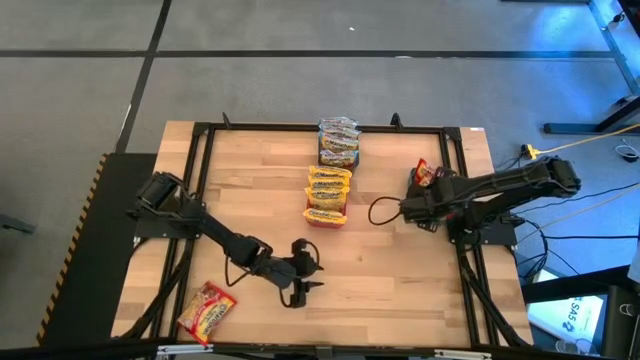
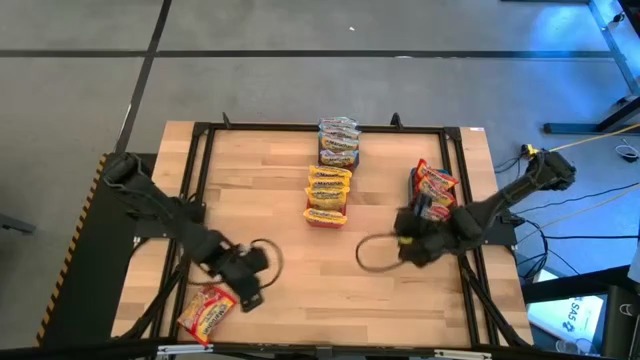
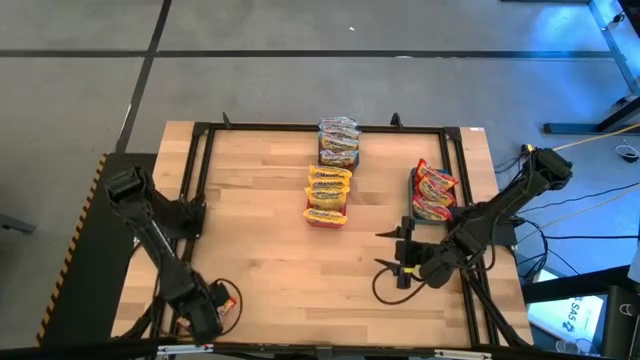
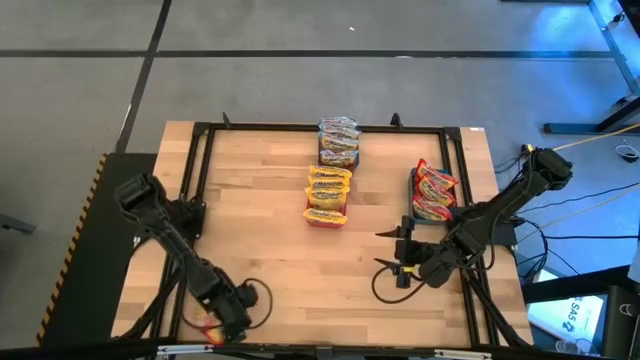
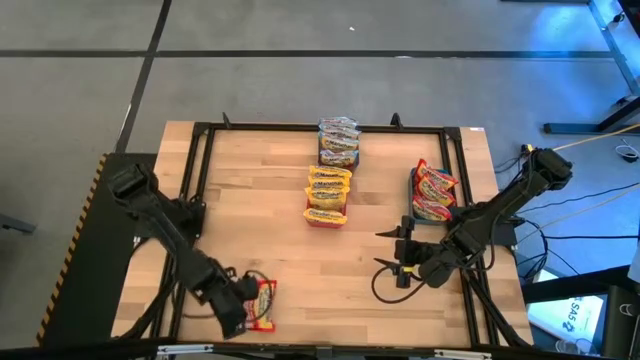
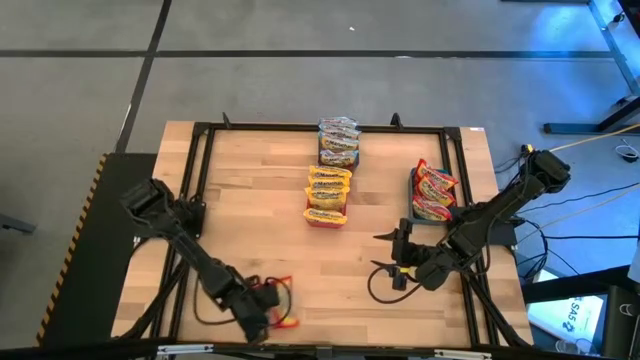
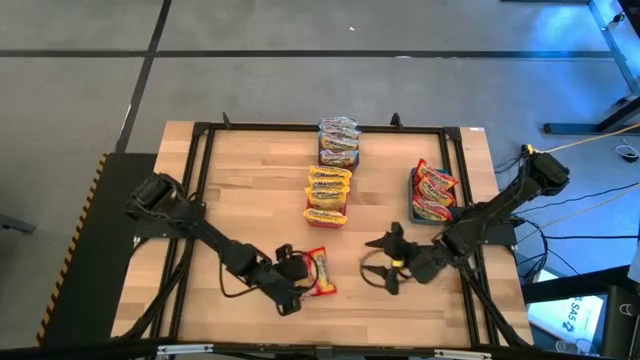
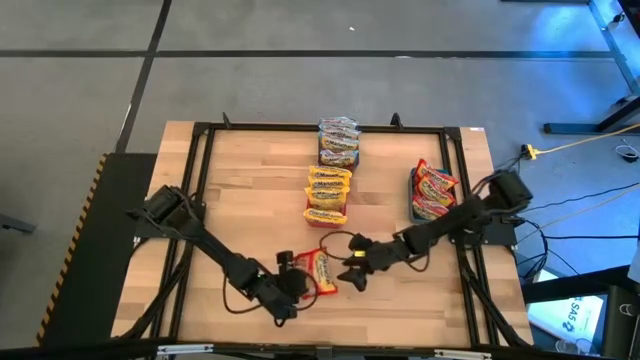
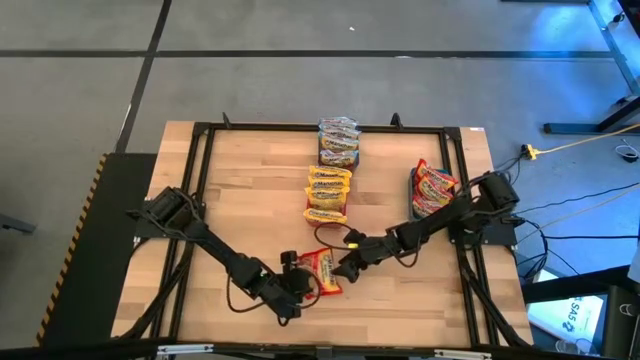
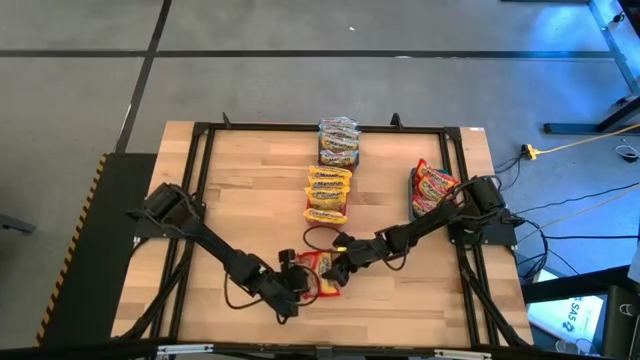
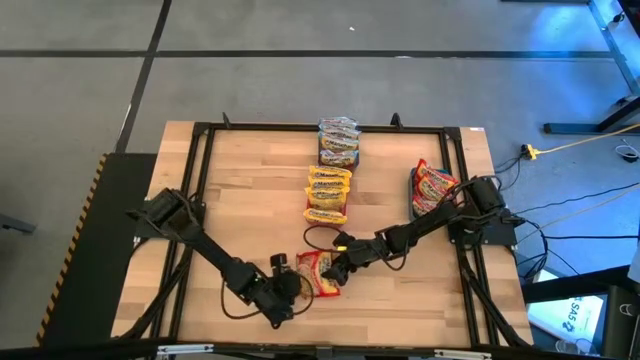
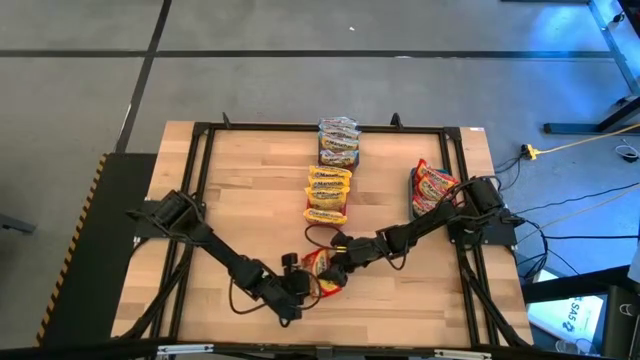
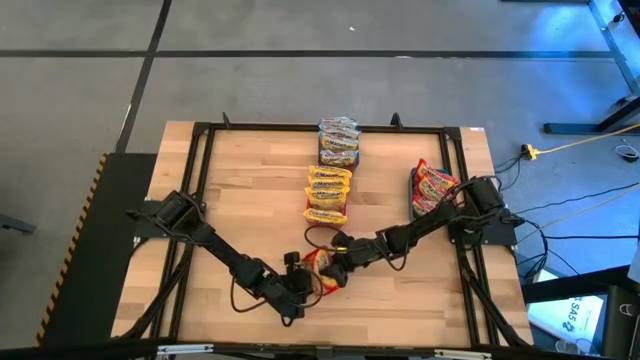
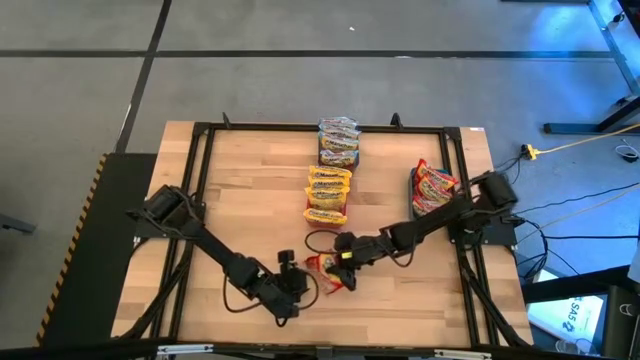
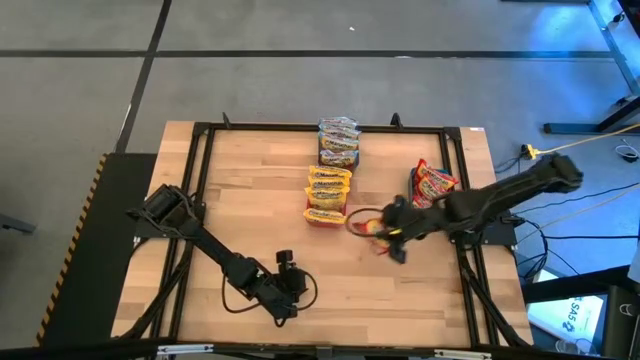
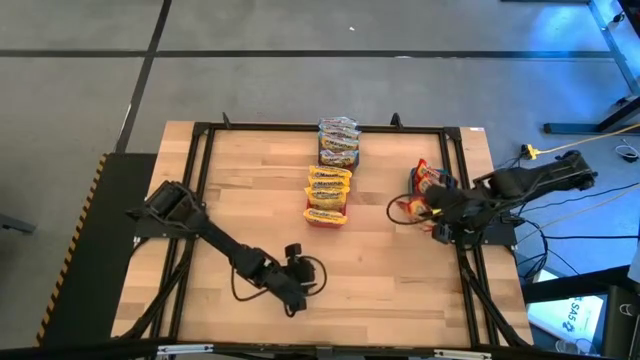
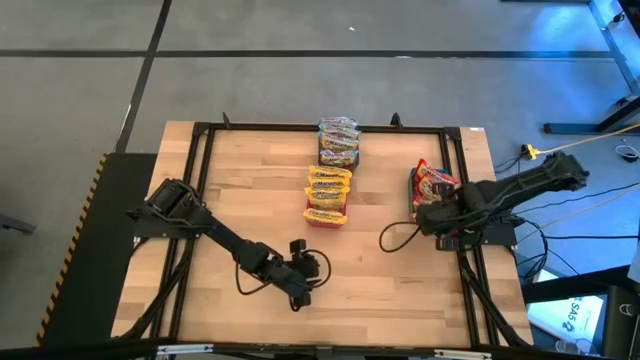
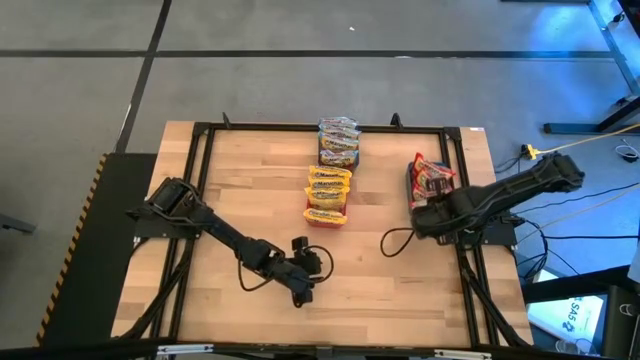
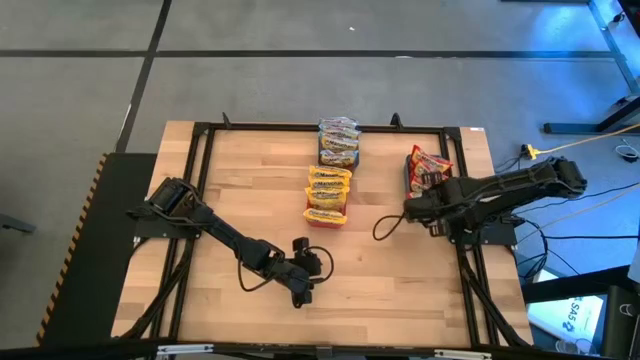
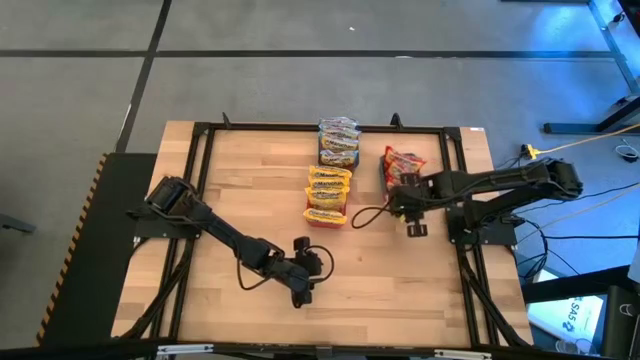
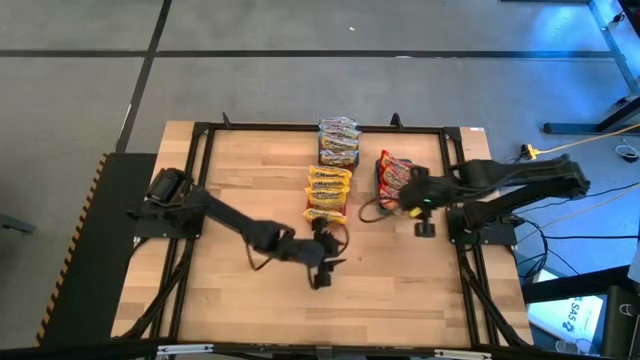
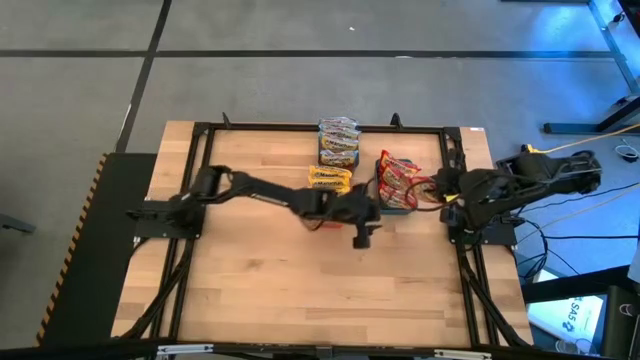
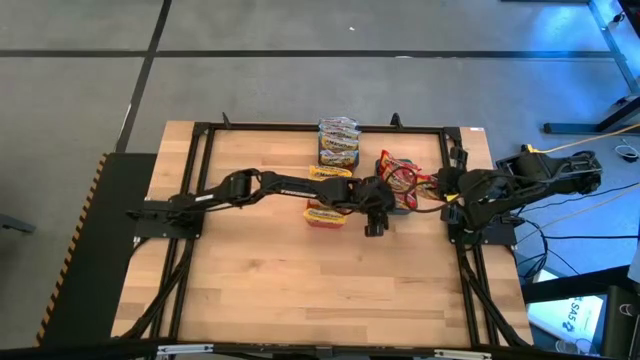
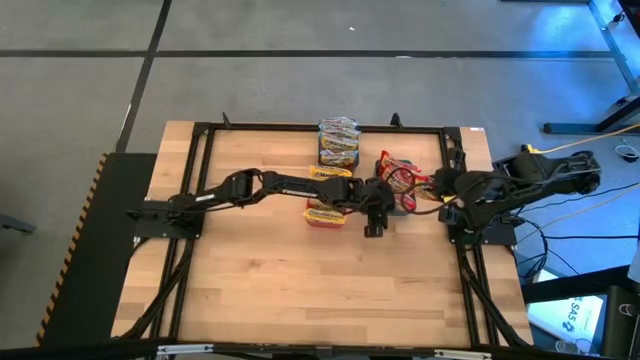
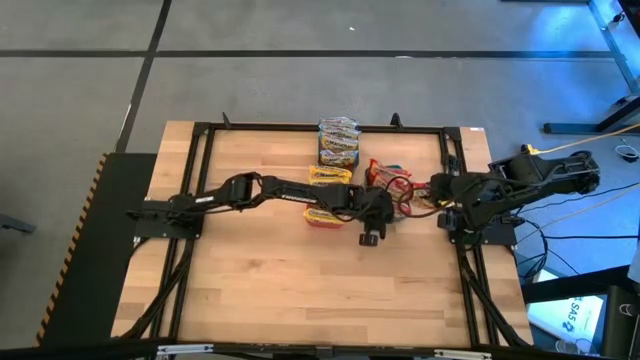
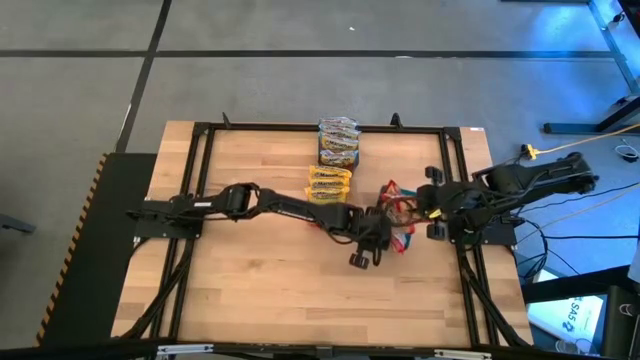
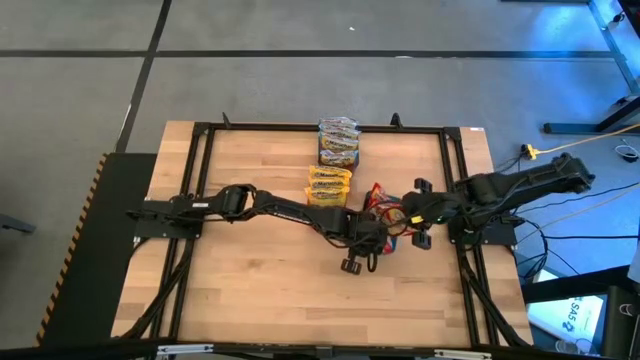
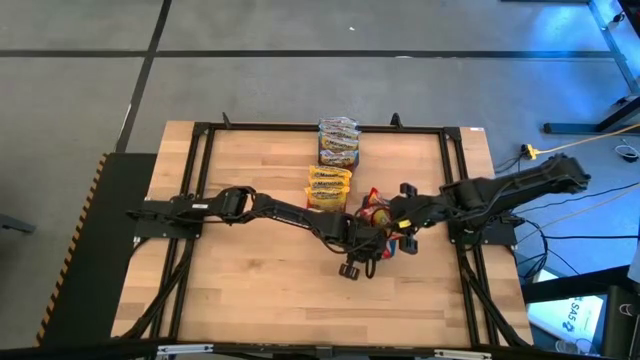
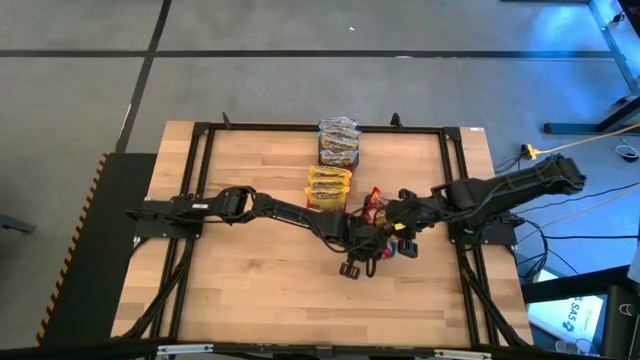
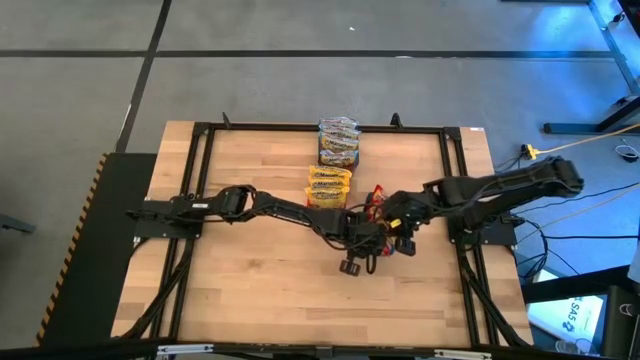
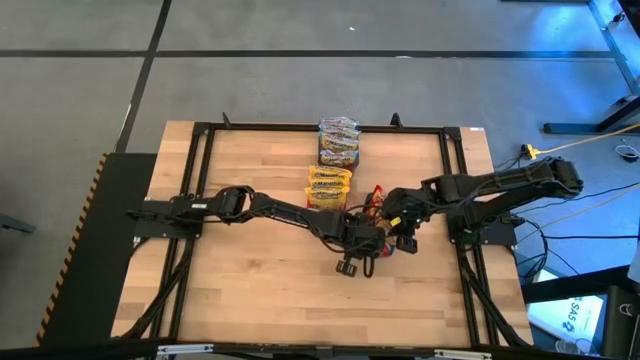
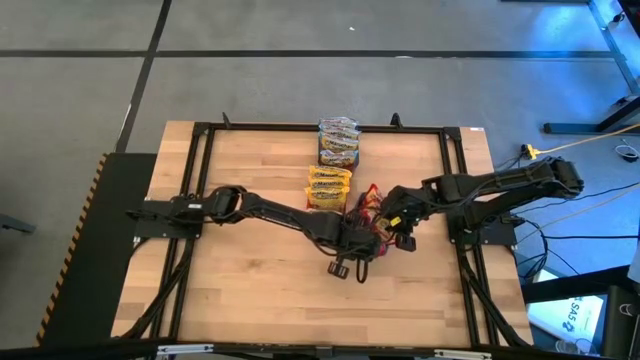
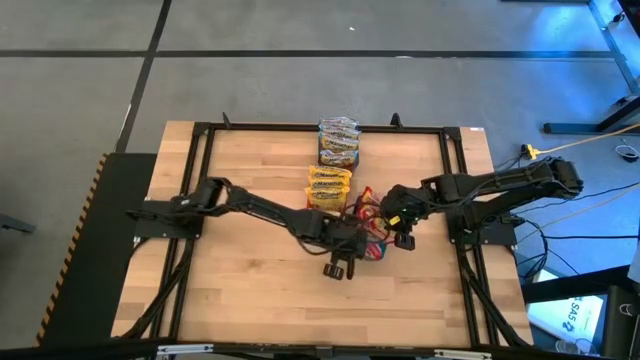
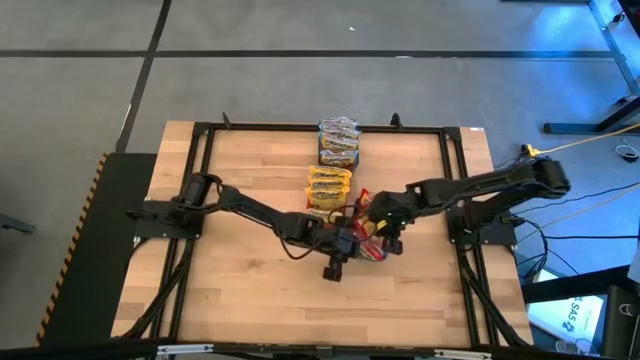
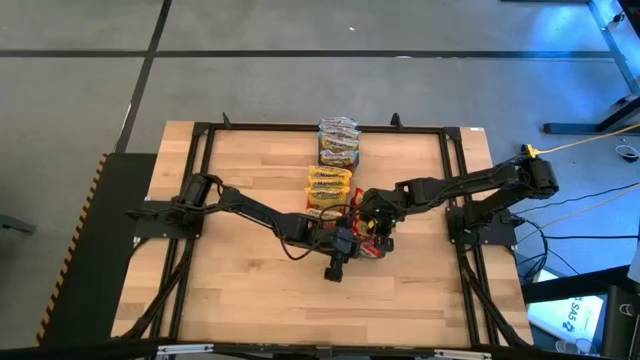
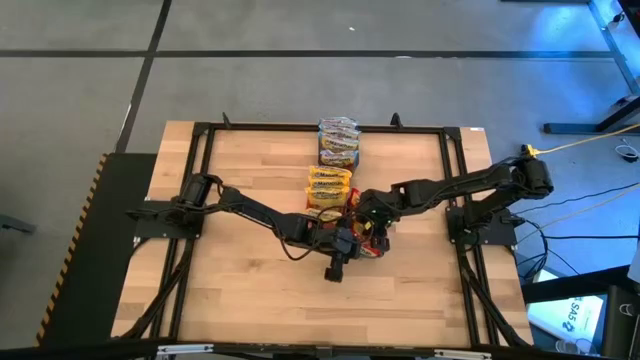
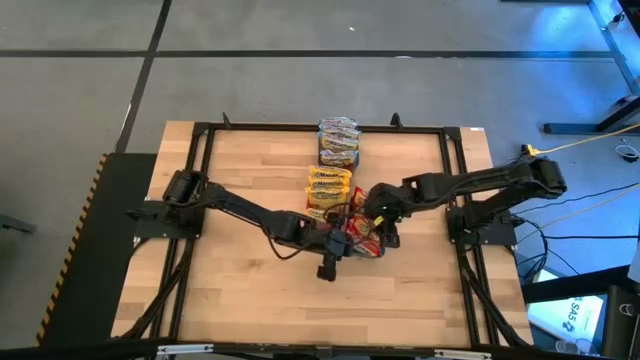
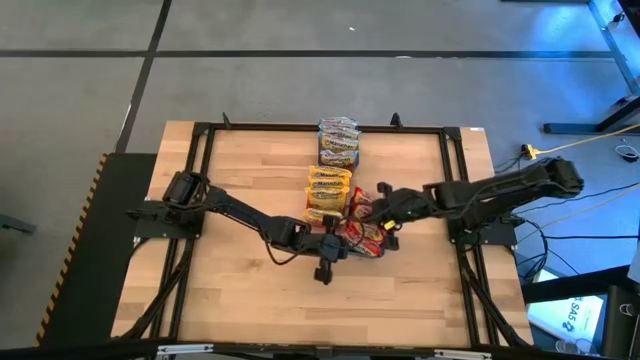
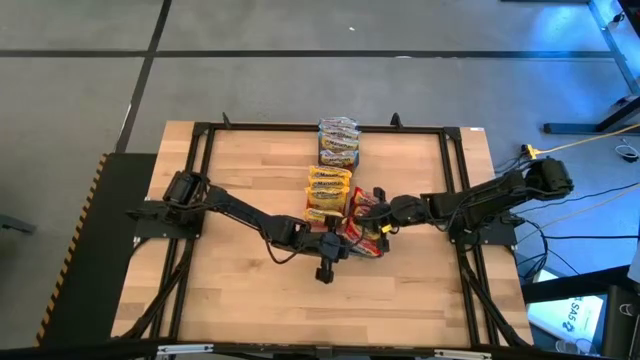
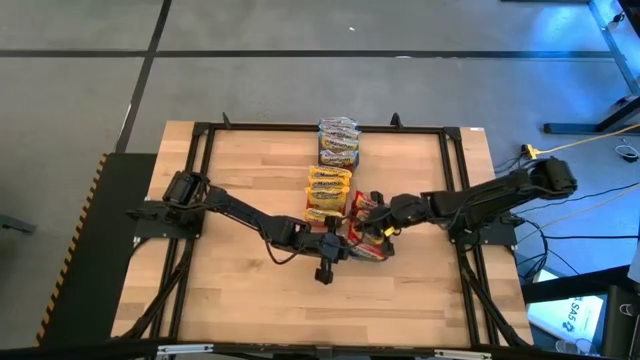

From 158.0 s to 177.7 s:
Task: Sort Maruchan noodles
Put the orange noodle pack into the blue bin

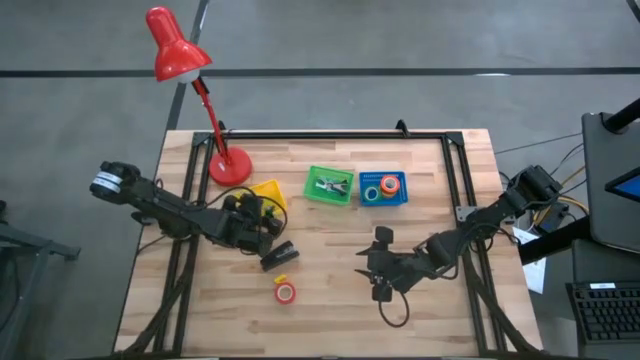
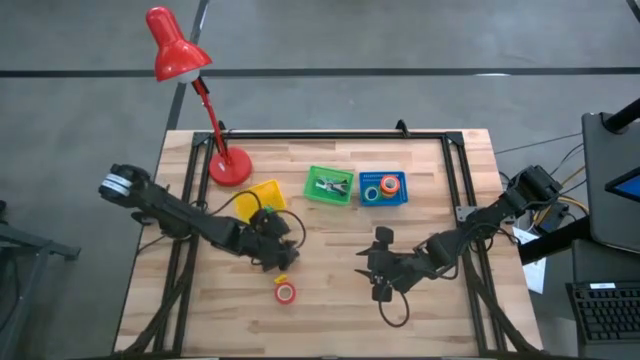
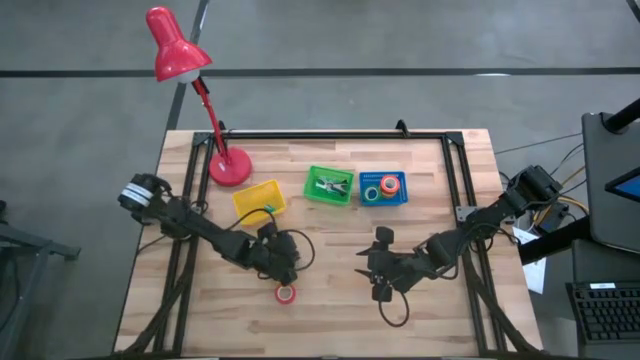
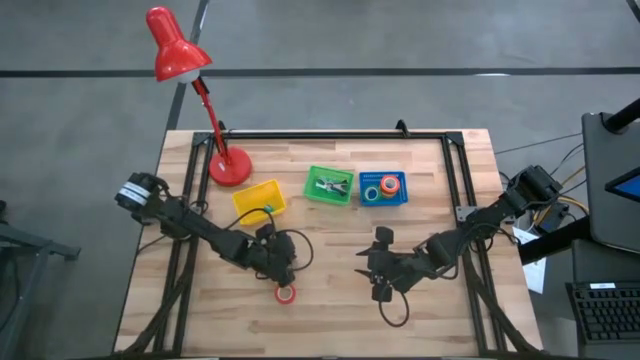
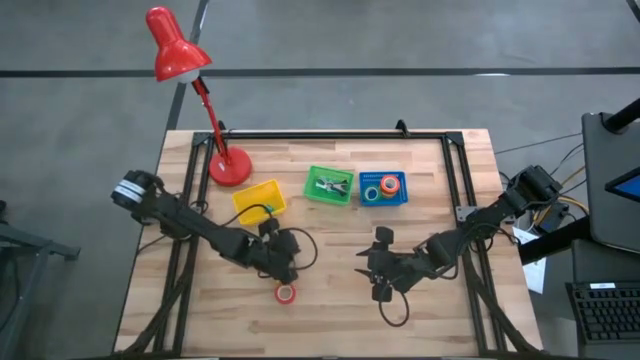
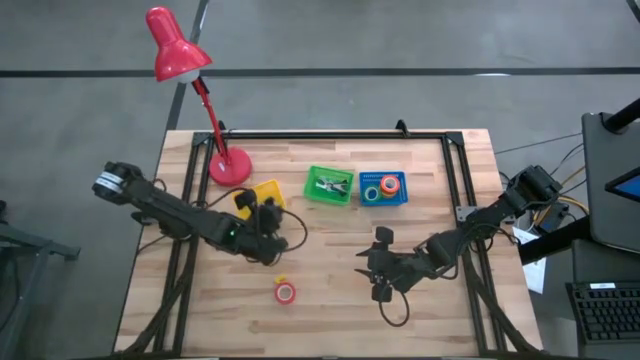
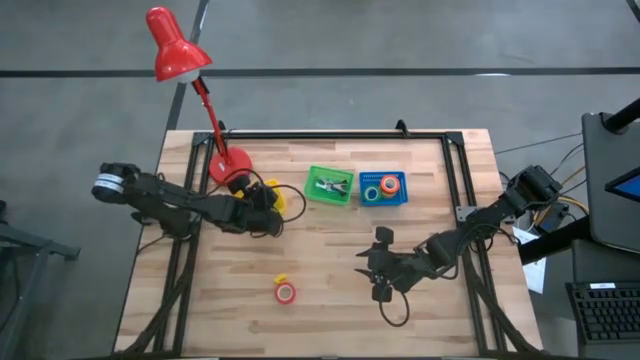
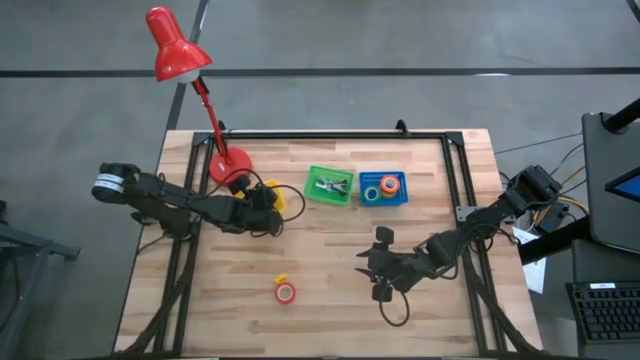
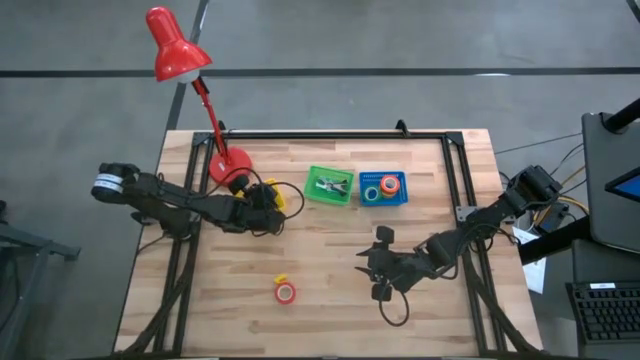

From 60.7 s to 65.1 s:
Task: Pick and place Stapler, Stapler remover, tape
Put the big black stapler in the yellow basket
